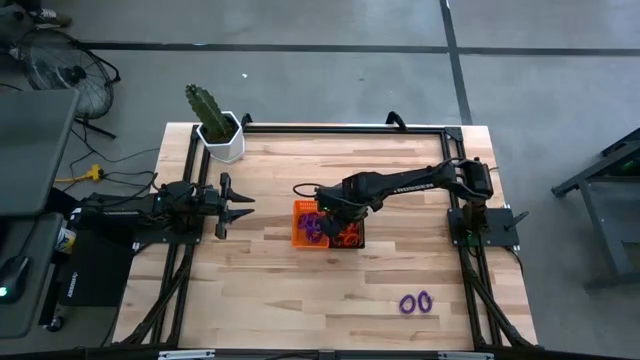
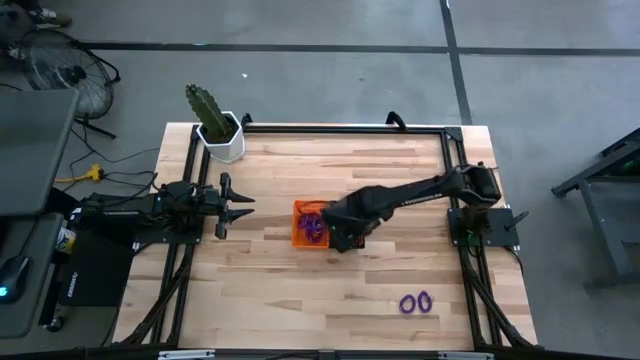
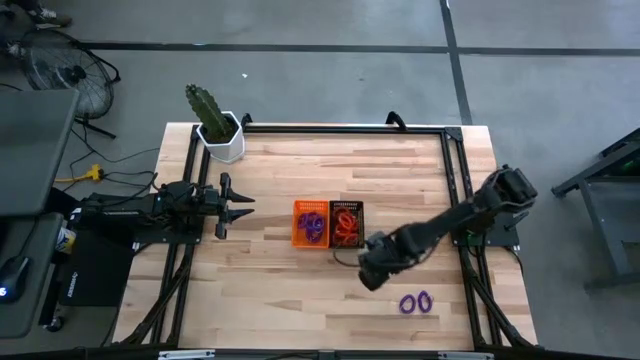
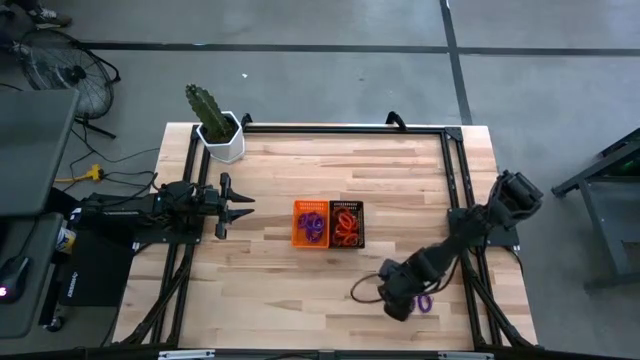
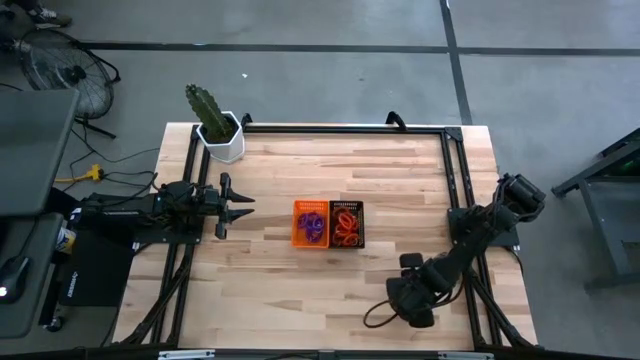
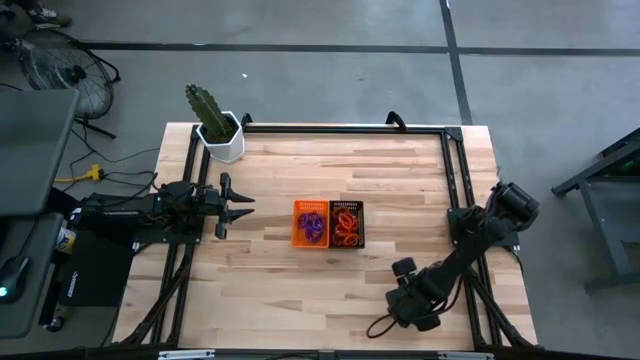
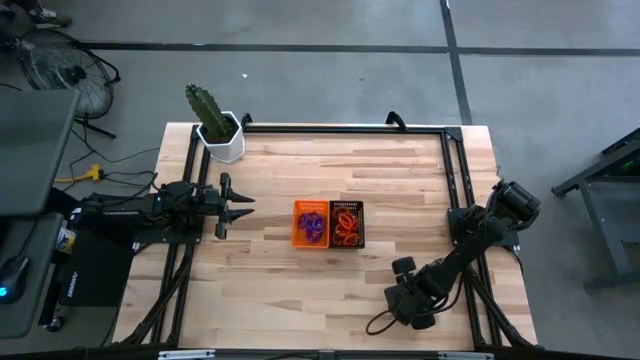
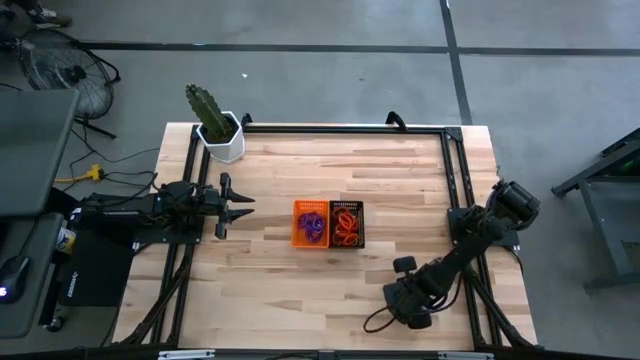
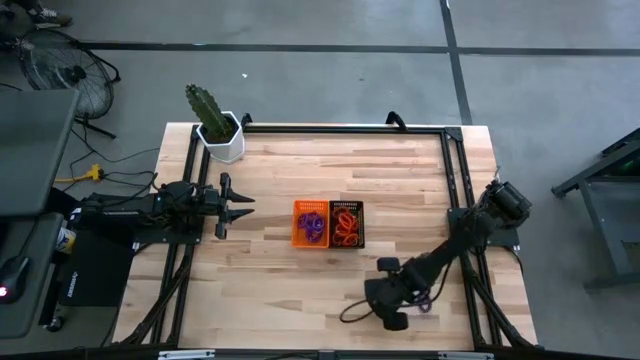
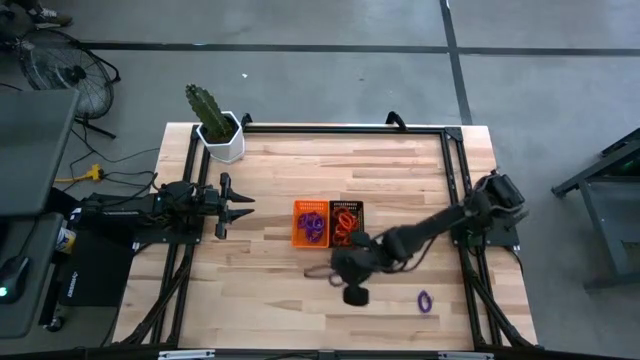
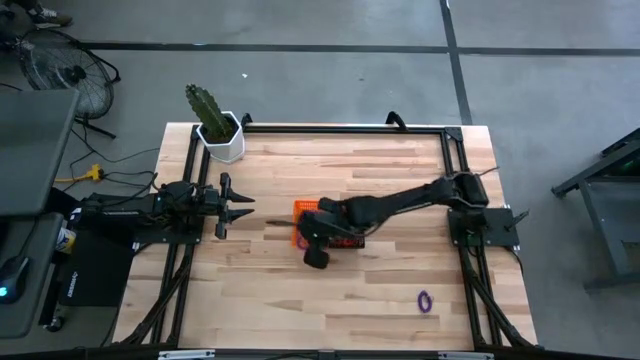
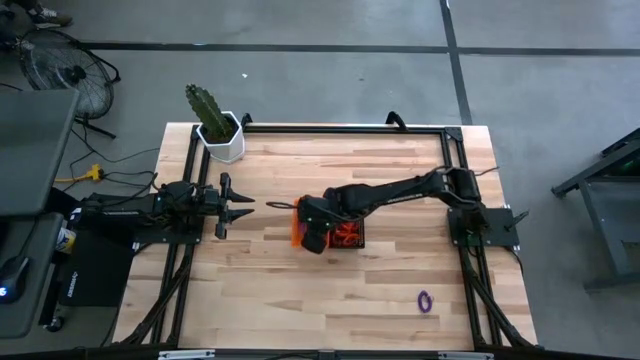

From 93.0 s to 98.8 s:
Task: Sort spring keychains
Put the violet spring keychain into the orange bin

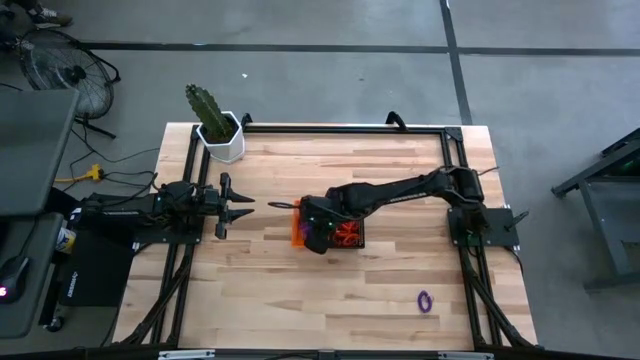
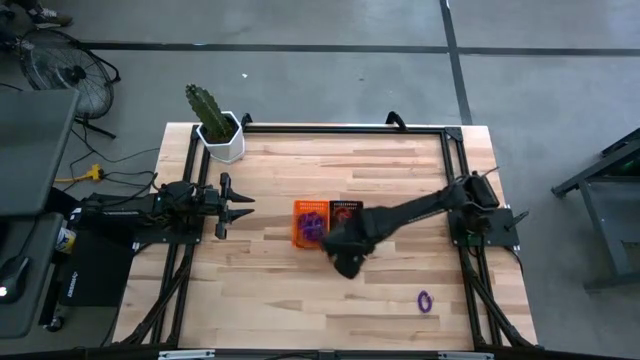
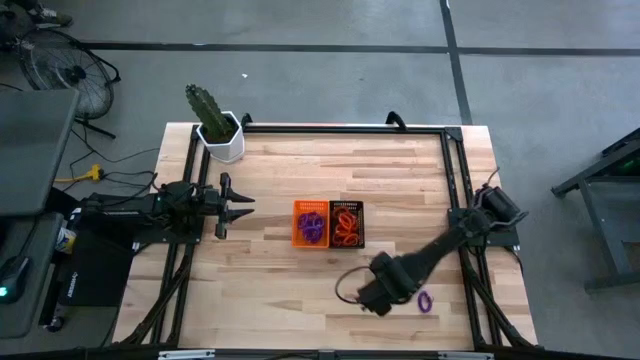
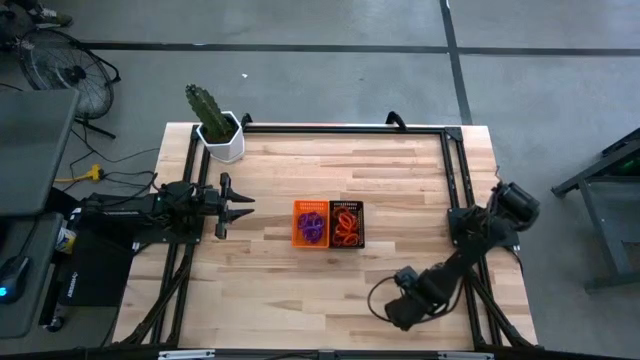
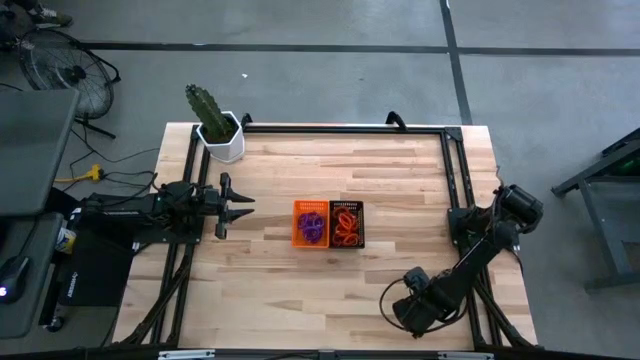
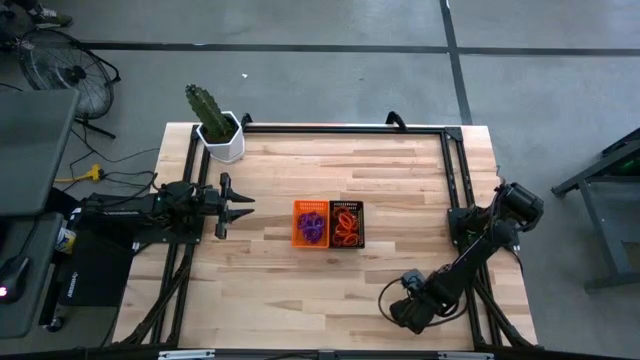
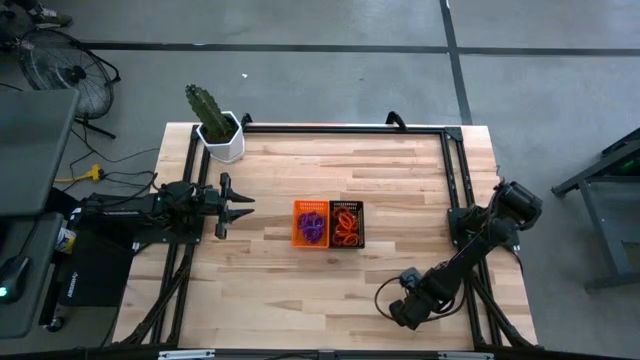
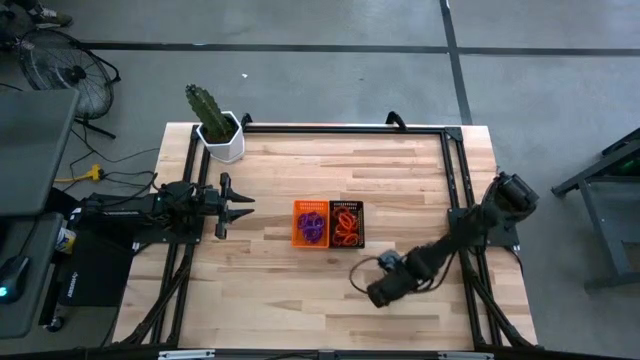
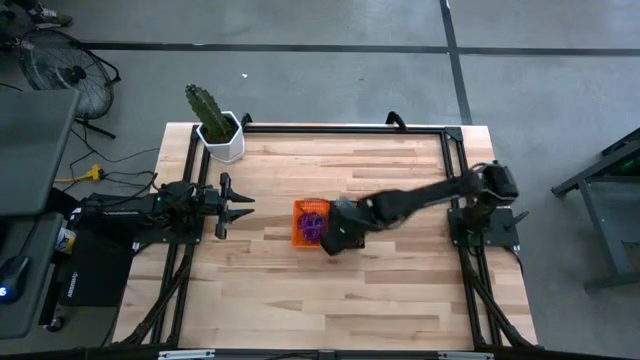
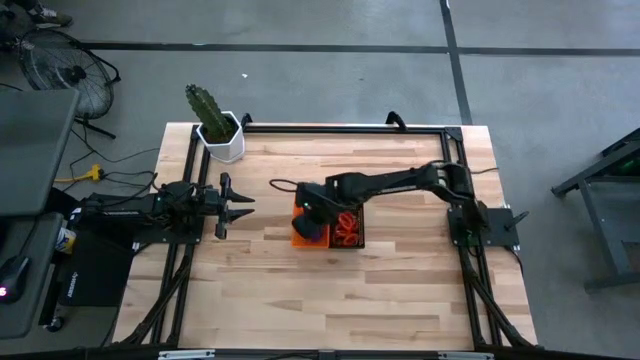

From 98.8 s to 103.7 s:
Put the violet spring keychain into the orange bin

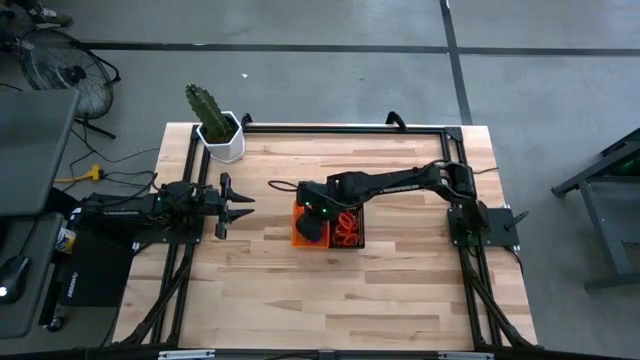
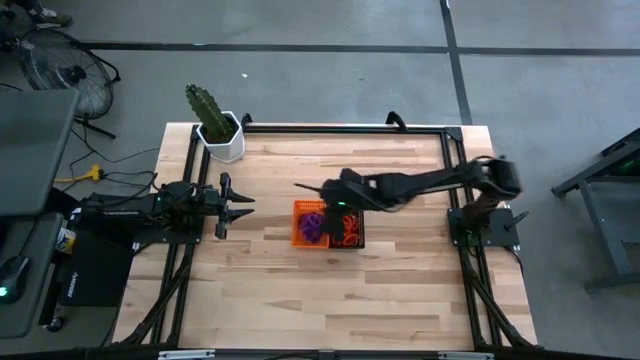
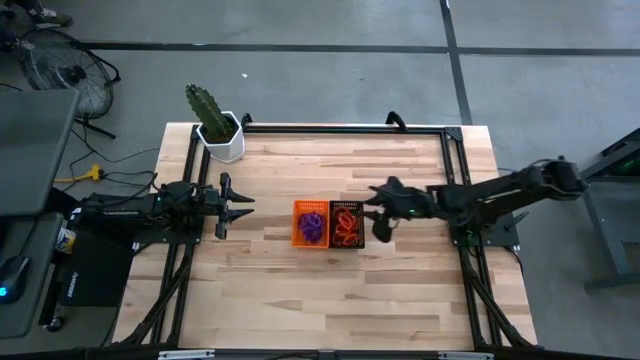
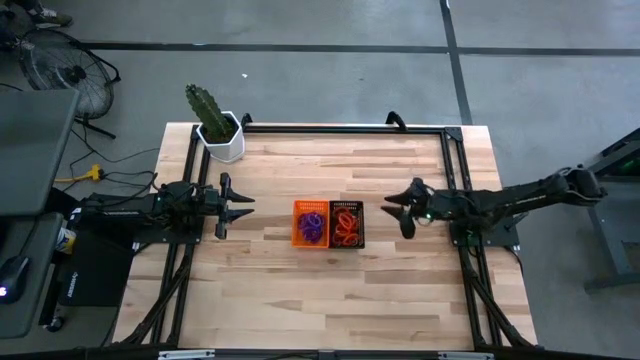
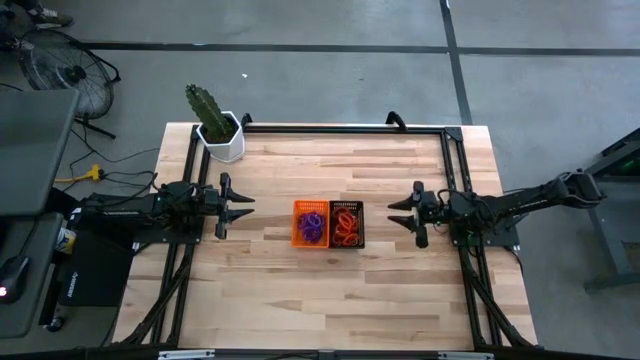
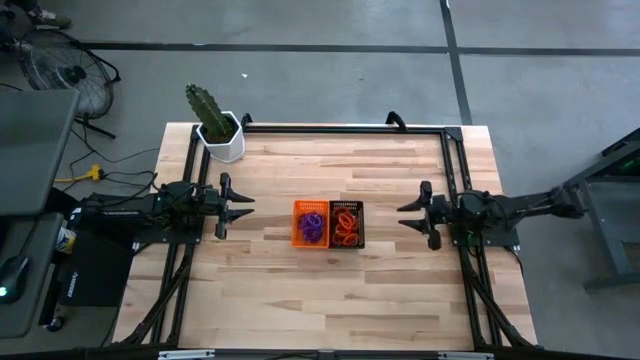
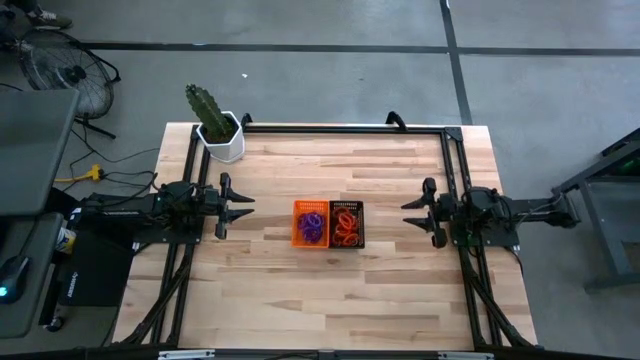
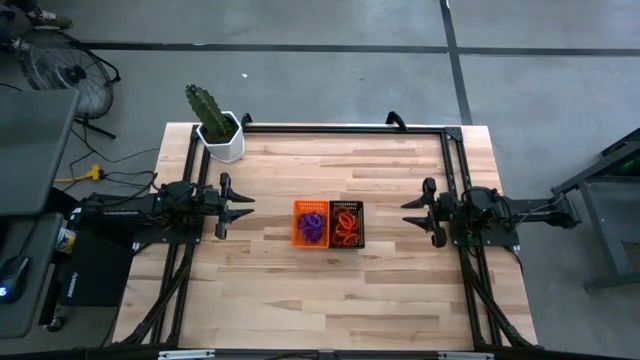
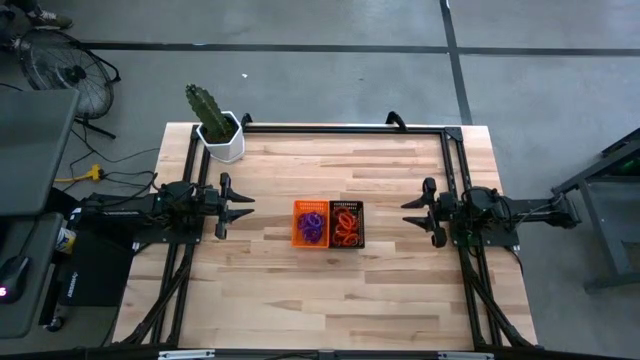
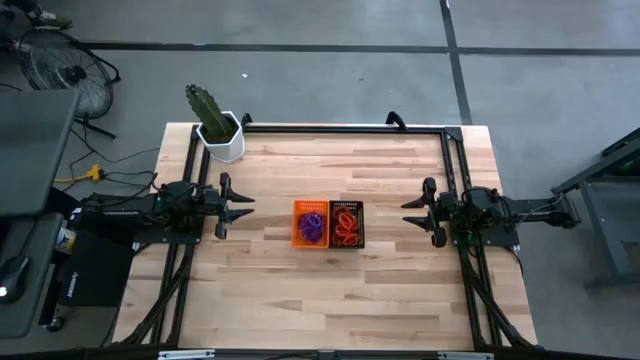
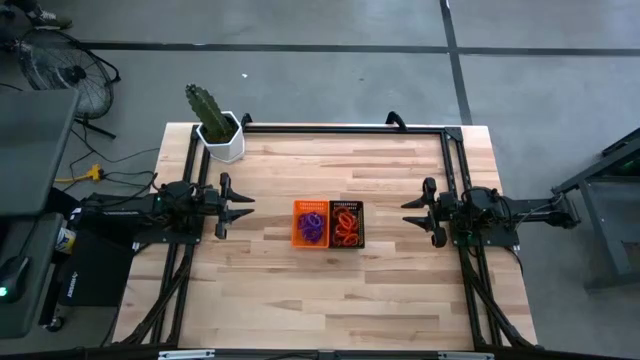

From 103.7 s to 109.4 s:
Return to Home Position

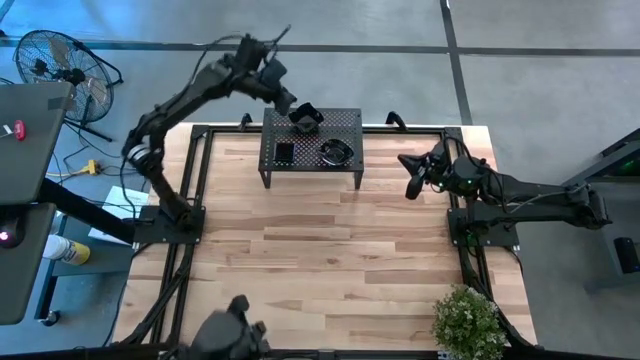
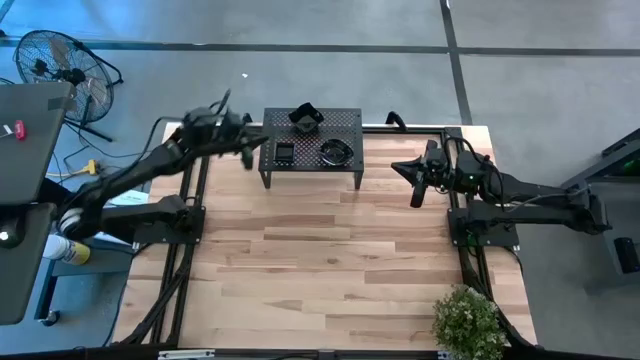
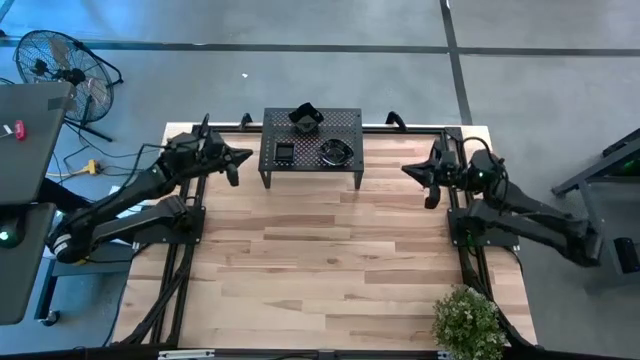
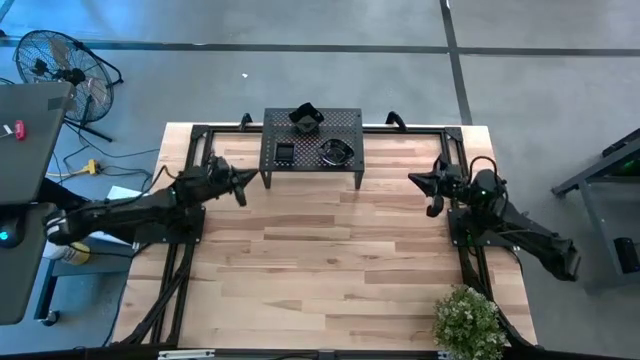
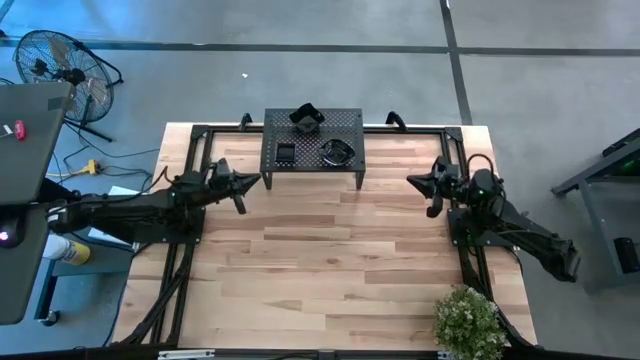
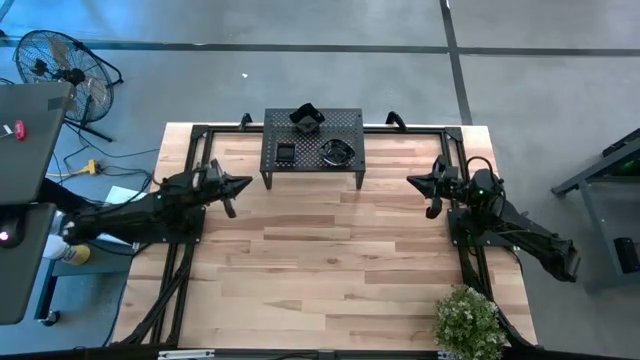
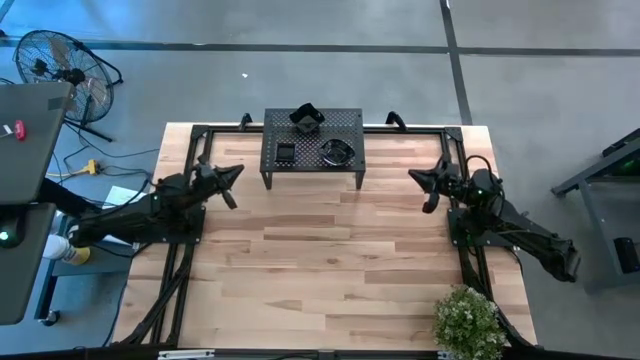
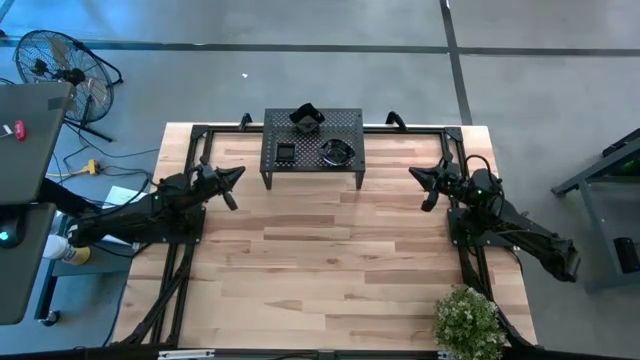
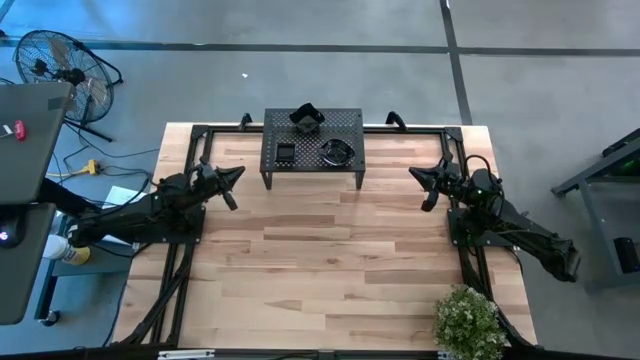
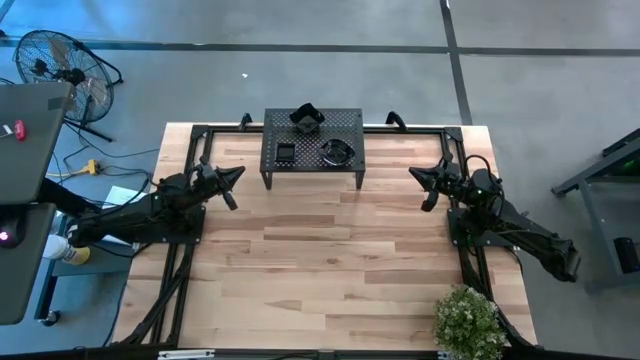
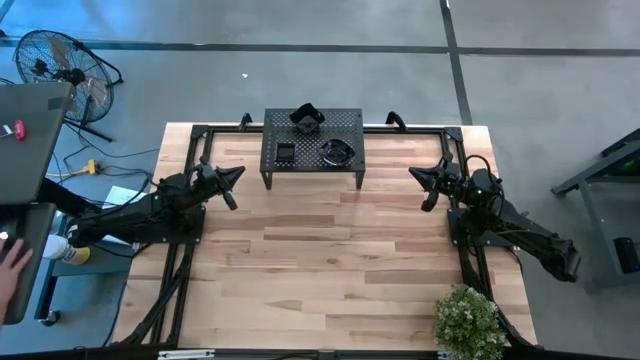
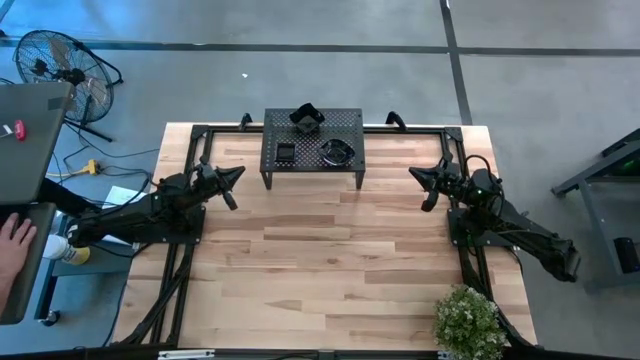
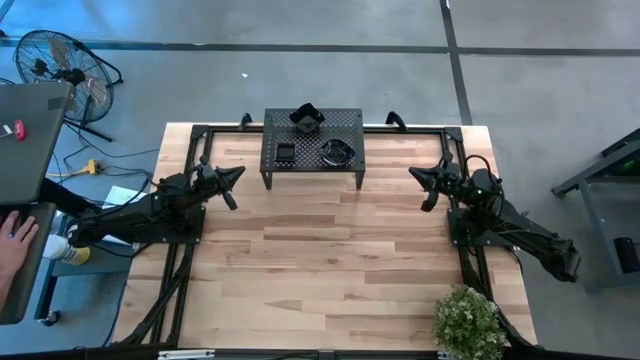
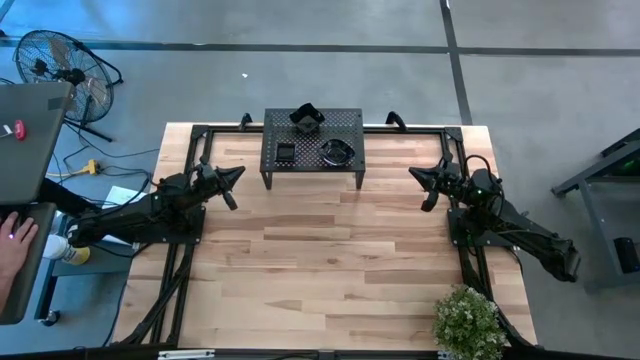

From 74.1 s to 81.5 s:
Task: Pick & Place Mini shaped plates
Return to Home Position
